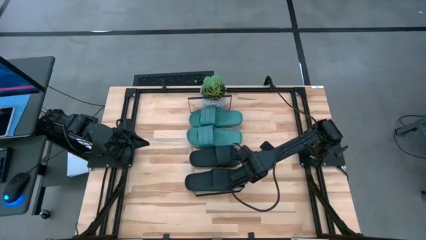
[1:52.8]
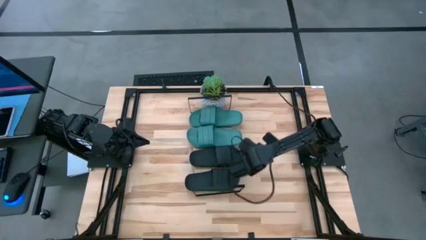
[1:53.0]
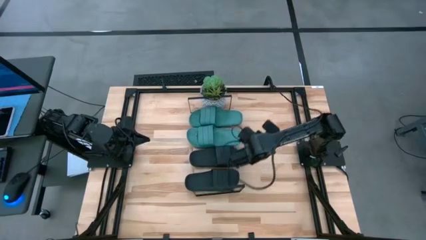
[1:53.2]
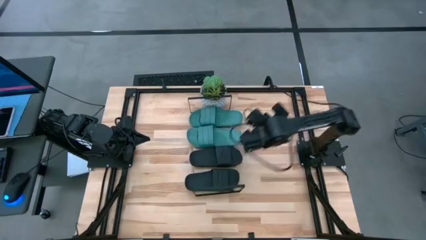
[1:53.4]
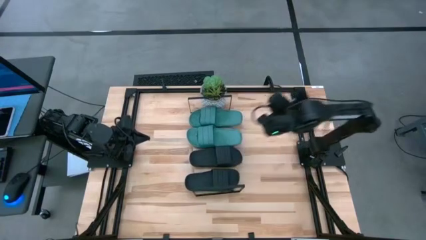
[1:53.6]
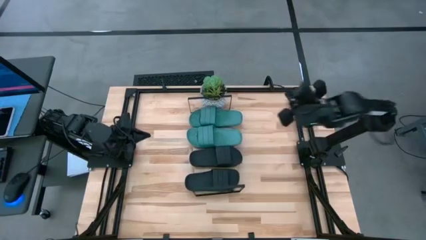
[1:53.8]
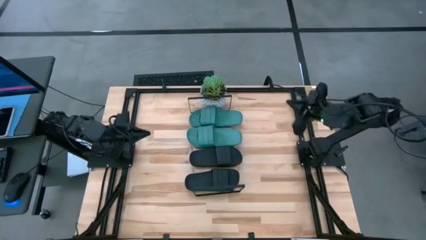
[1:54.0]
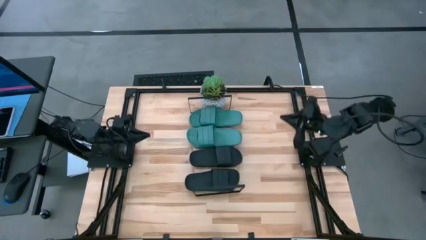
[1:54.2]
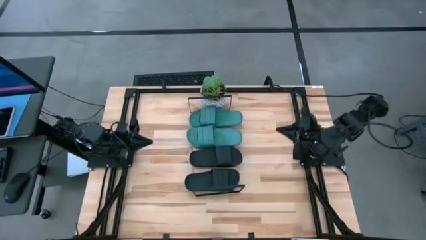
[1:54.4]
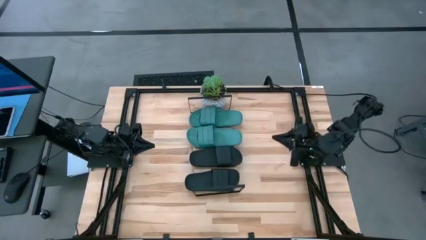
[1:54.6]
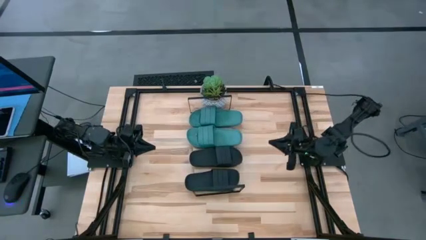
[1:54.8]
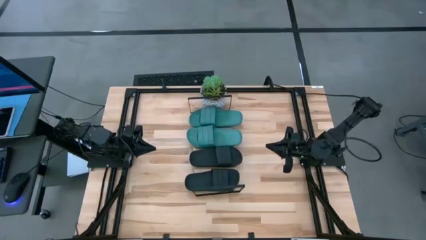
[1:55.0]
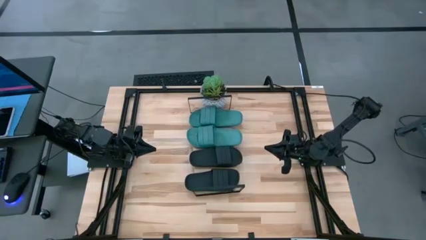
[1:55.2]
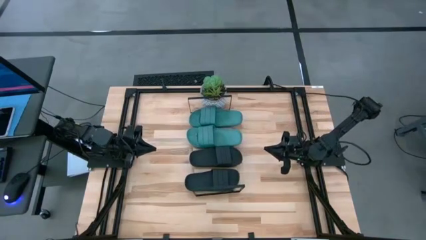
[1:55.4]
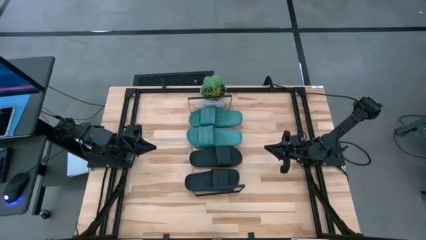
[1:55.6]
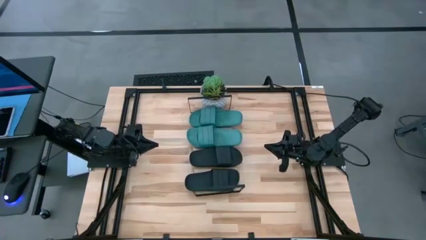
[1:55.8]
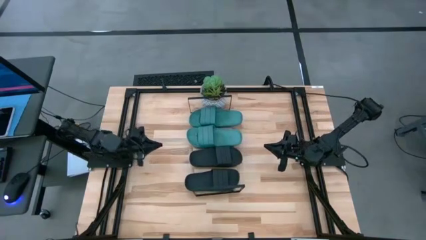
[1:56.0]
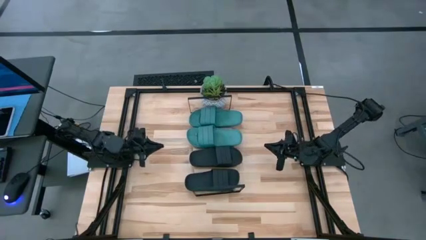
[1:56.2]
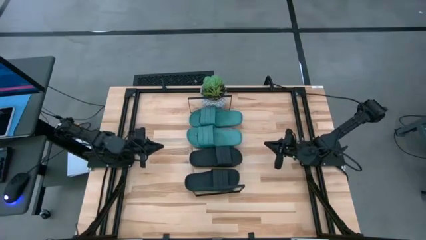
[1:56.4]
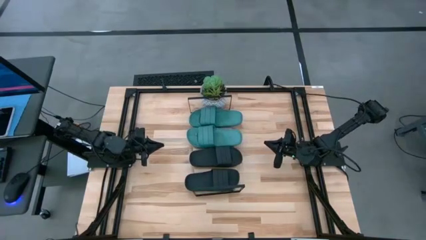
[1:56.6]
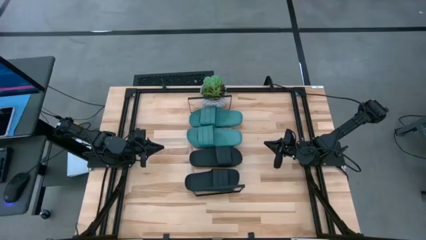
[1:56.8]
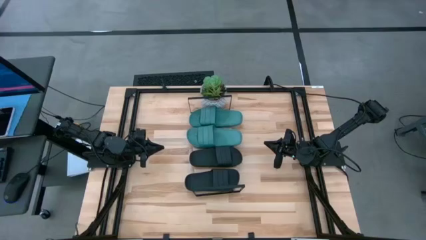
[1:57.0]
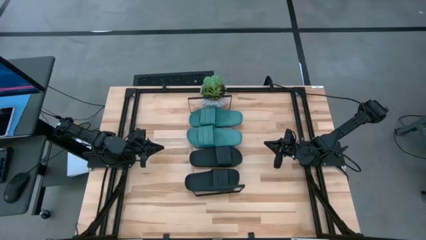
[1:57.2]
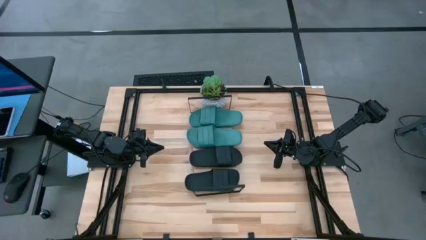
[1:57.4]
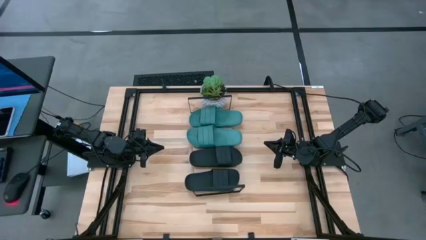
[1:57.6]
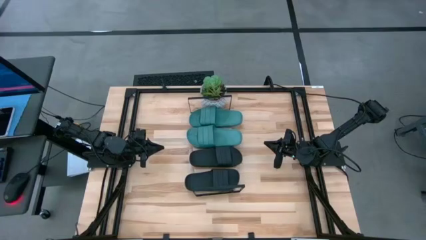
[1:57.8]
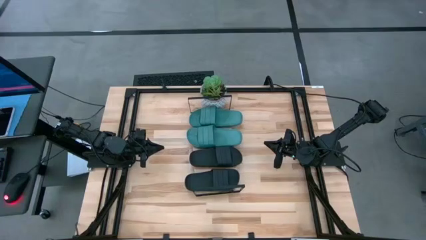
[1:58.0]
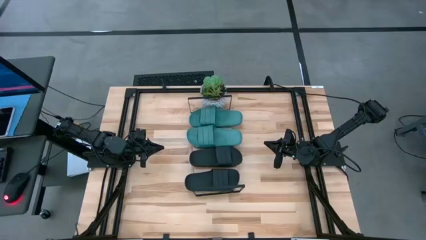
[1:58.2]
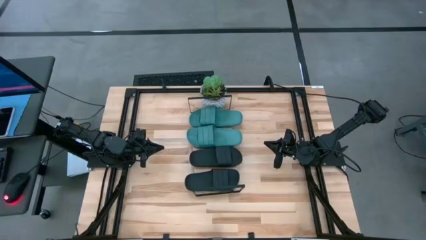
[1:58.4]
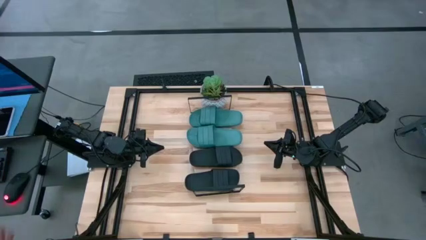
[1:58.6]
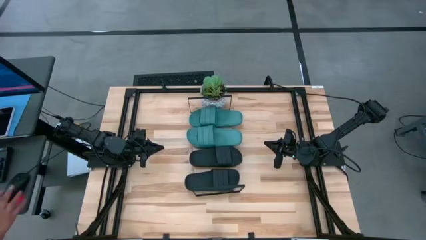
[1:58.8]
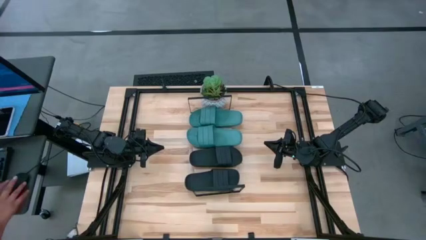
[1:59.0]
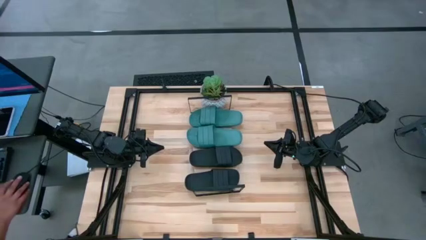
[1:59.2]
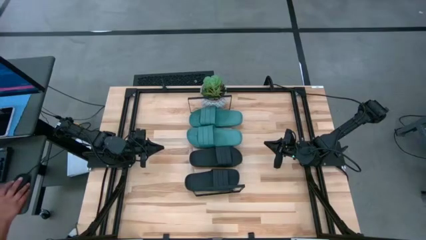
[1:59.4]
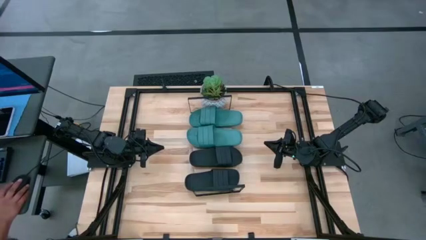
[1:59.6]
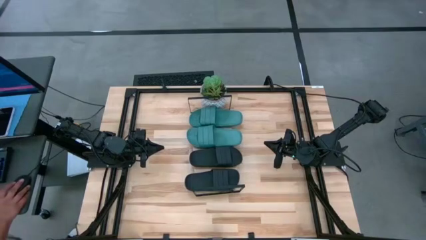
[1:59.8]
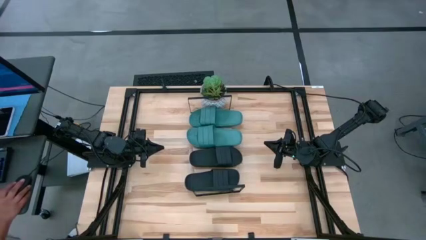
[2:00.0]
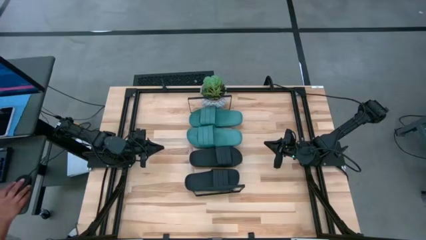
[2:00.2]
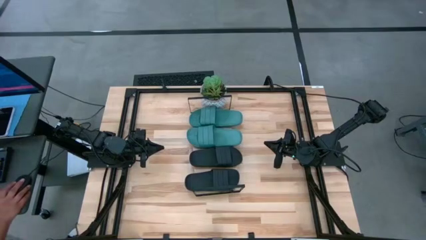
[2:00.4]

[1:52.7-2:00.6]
Task: Pick and place slides into the shelf
Return to Home Position

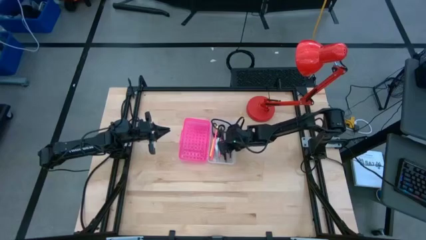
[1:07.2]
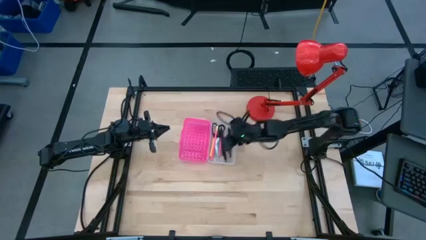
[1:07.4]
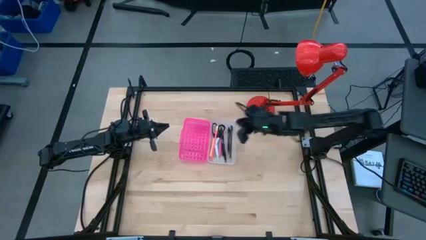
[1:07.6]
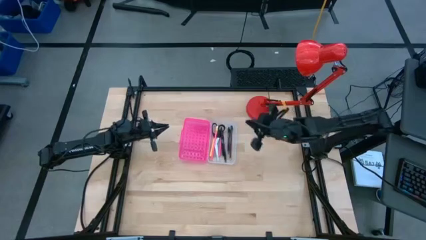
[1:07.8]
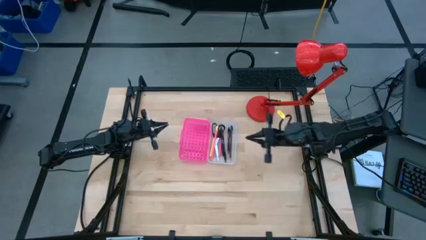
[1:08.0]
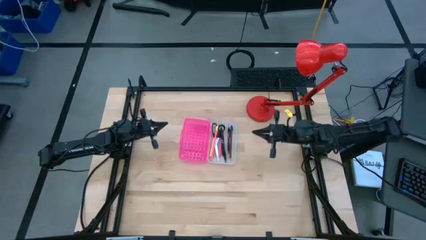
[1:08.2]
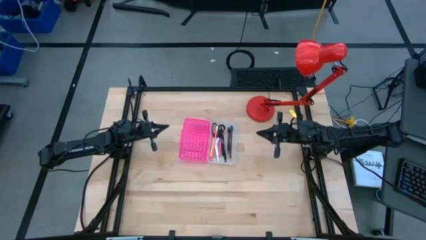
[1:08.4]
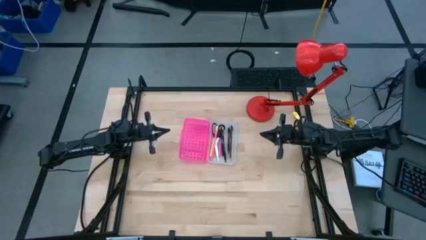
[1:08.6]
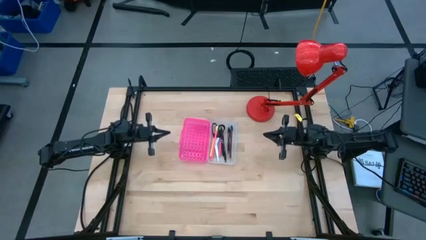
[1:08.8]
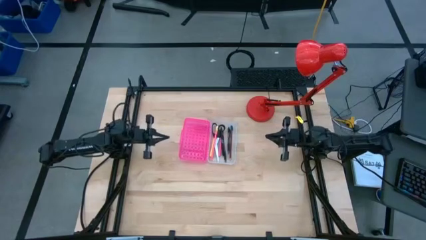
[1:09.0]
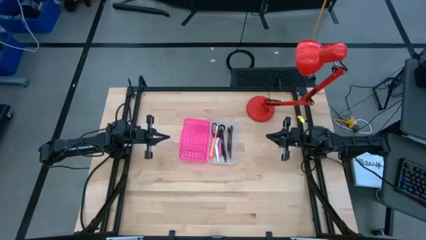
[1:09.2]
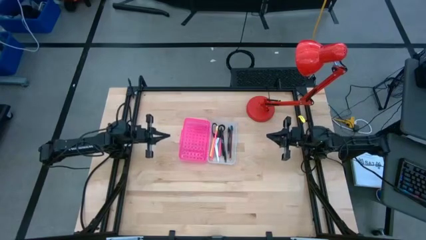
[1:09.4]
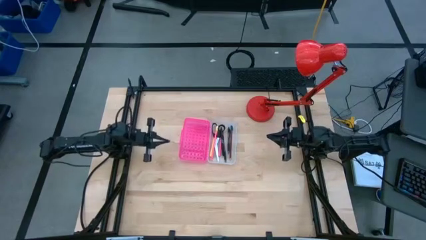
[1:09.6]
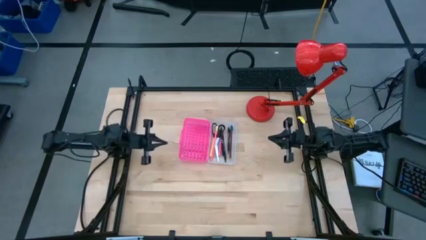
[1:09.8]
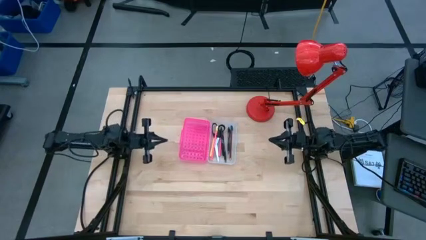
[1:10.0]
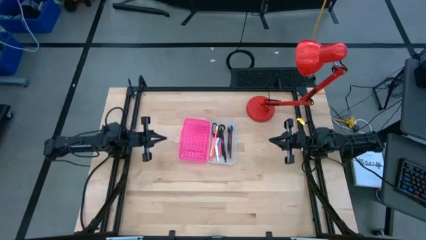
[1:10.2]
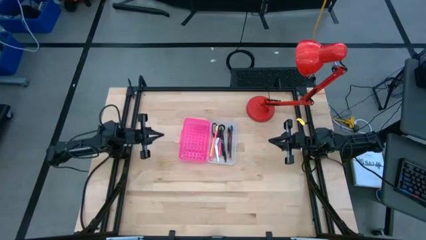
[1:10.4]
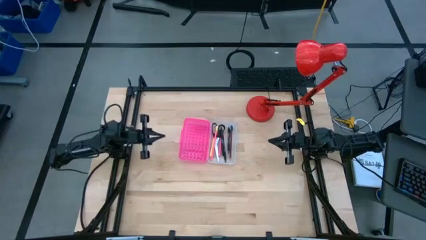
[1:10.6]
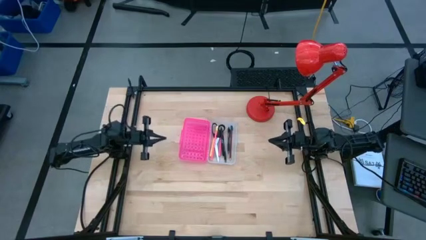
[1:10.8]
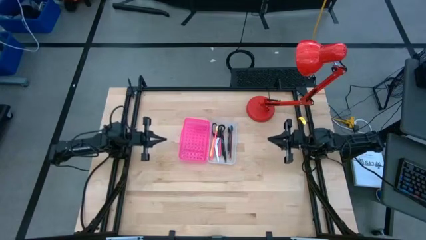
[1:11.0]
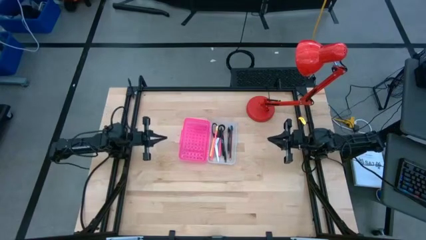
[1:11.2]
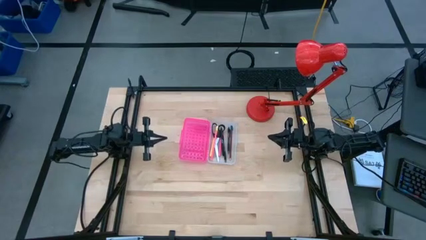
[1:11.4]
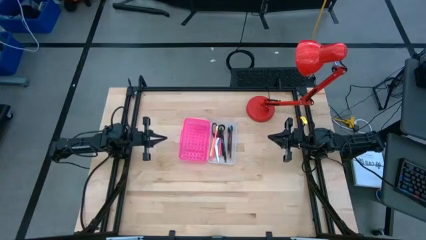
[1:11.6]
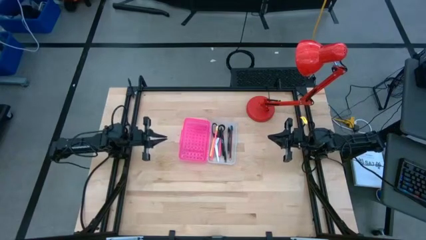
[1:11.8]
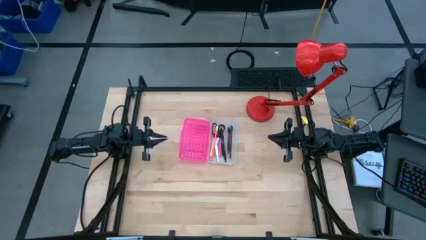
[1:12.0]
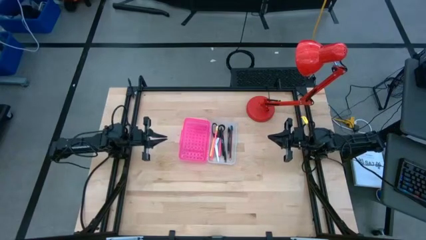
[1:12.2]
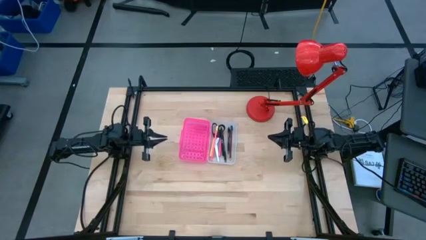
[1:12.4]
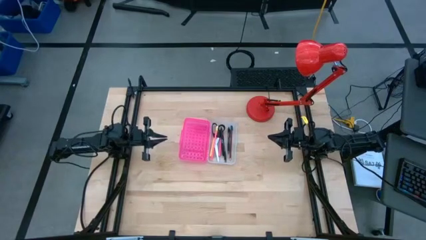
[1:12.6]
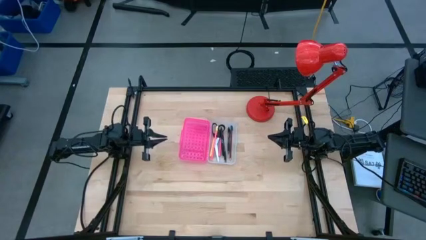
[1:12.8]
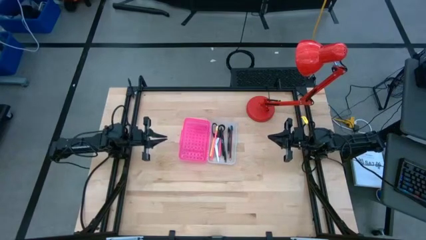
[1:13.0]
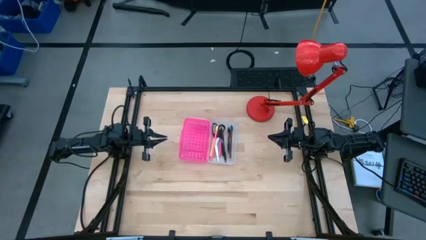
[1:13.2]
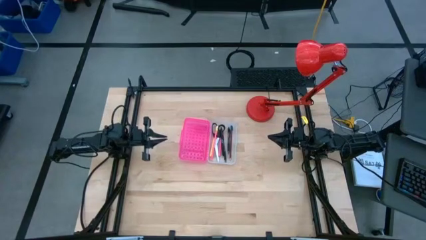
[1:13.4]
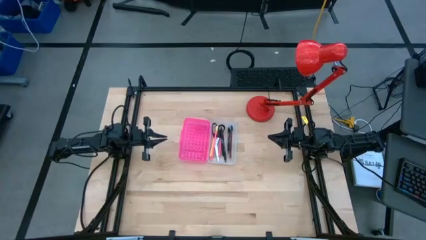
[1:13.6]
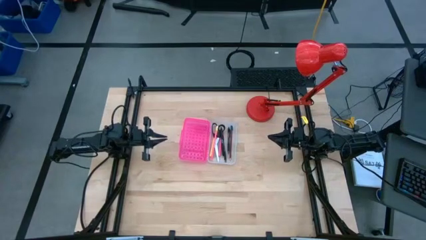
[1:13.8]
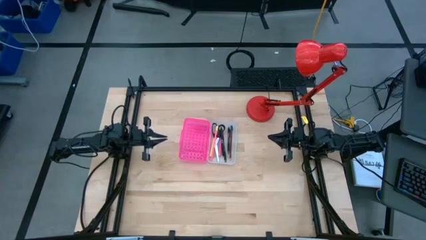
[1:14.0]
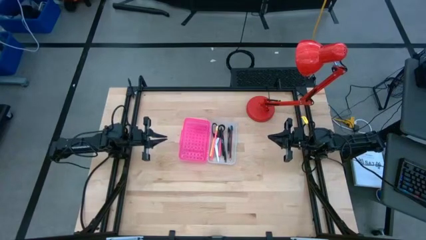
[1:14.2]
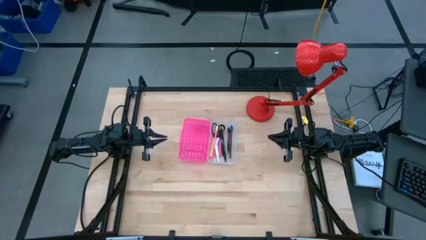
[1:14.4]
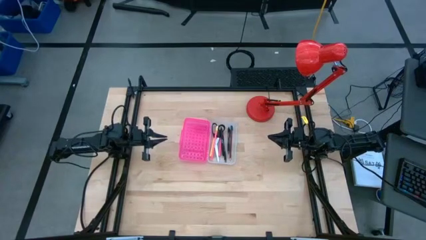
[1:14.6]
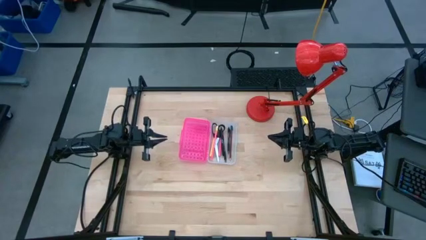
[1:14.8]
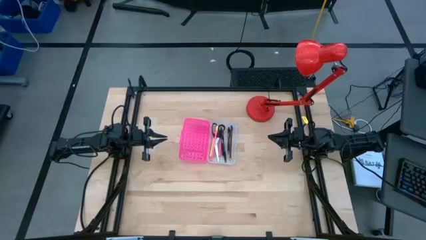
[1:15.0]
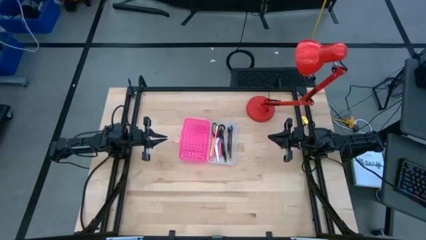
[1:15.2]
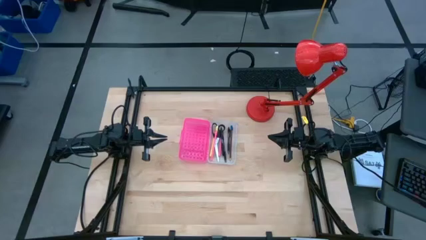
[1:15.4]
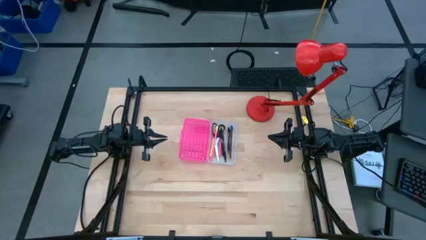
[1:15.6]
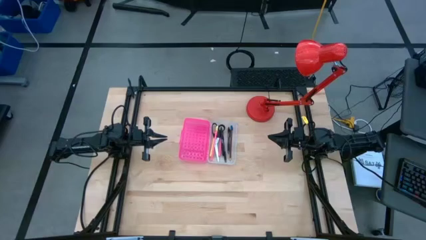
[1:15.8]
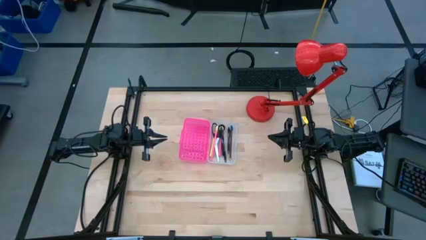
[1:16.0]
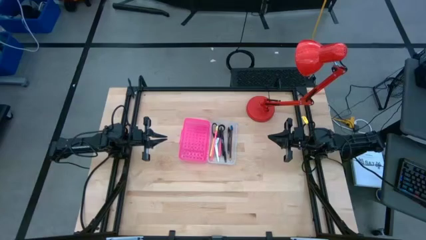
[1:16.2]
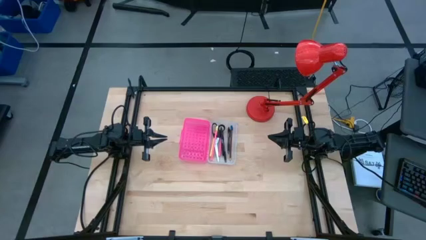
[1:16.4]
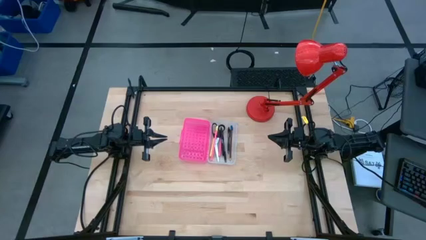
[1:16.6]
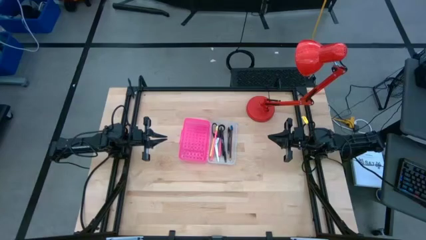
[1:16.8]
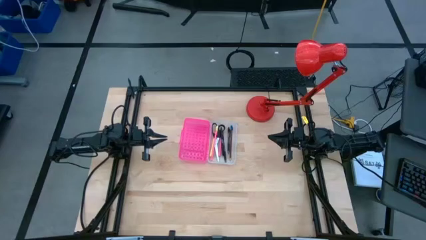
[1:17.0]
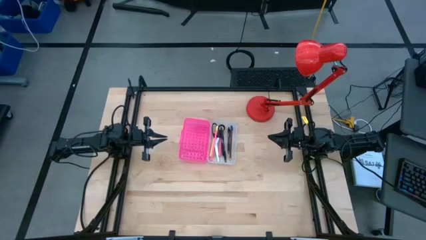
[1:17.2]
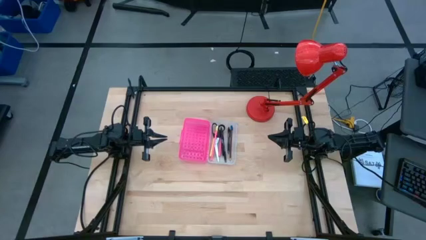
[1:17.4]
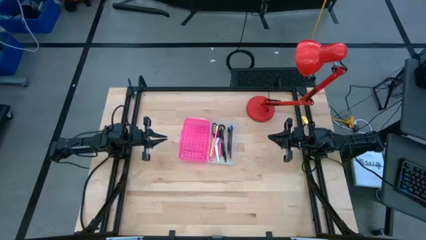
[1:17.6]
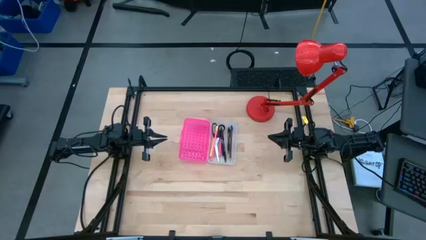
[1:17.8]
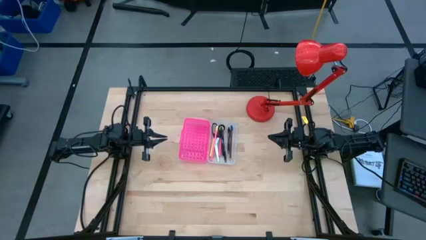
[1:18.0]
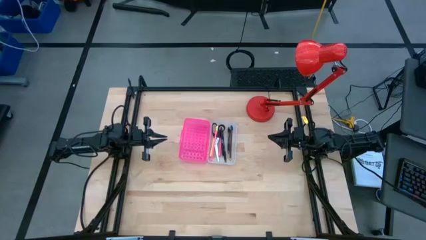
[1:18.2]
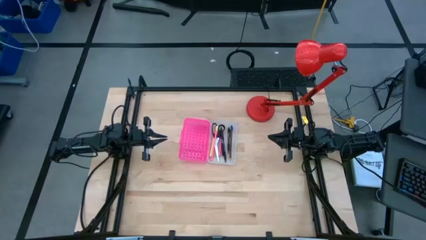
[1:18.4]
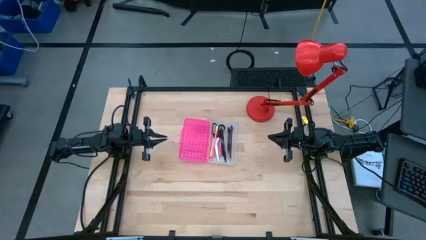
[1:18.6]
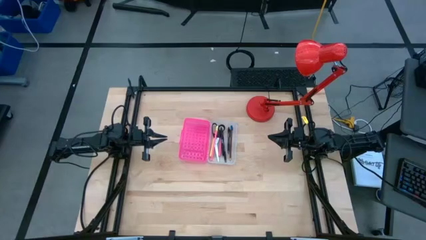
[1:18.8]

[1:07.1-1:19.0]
Task: Pick & place school supplies into a supply box
Return to Home Position
